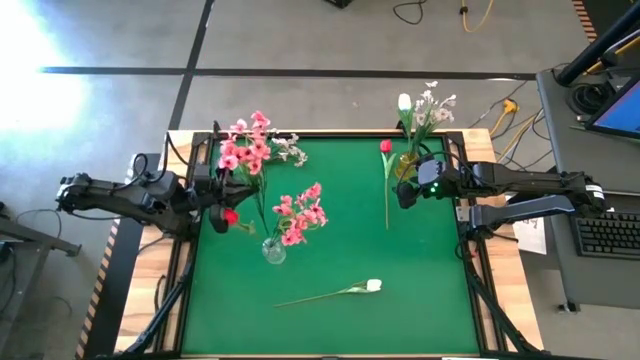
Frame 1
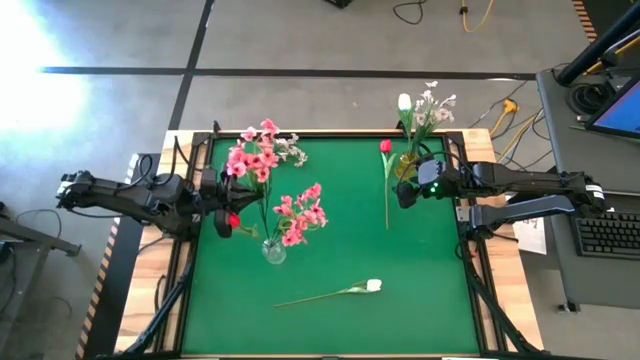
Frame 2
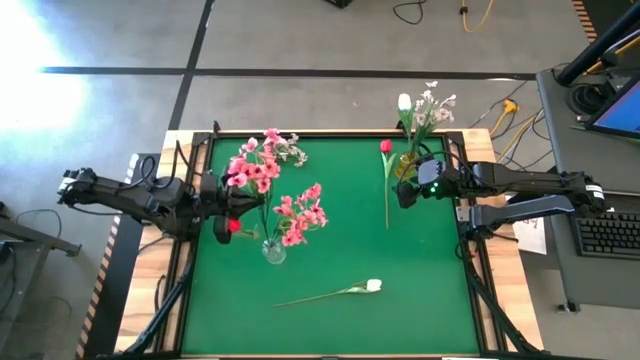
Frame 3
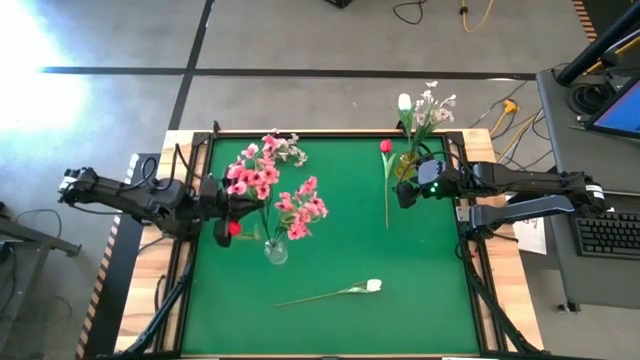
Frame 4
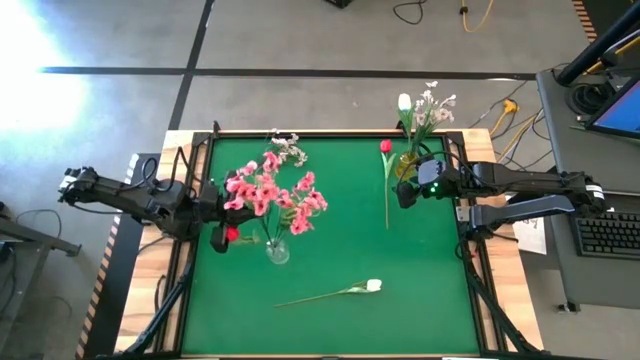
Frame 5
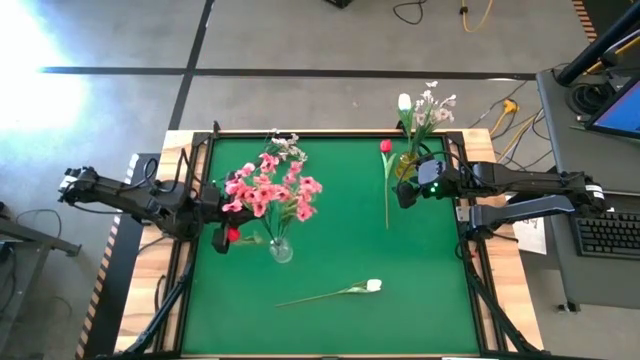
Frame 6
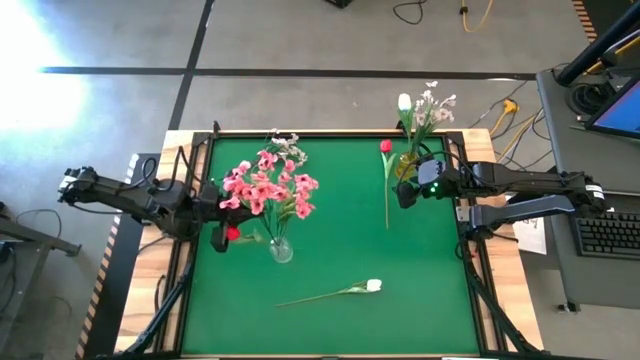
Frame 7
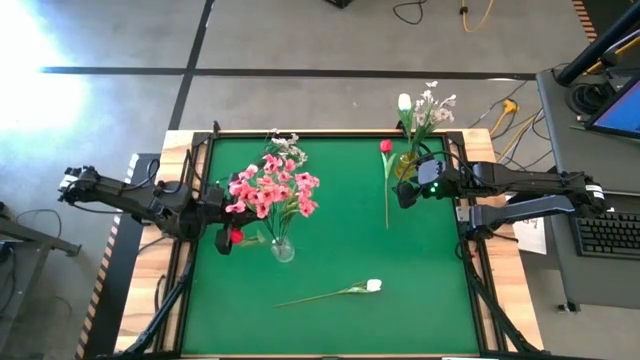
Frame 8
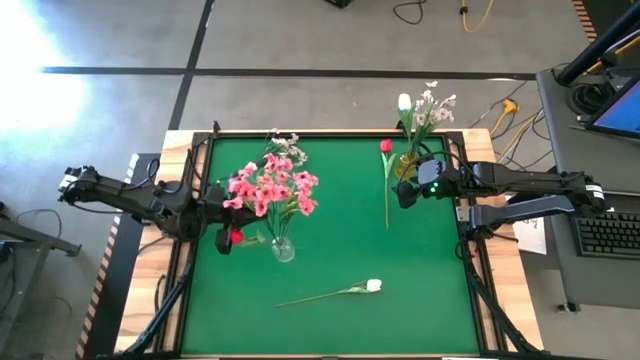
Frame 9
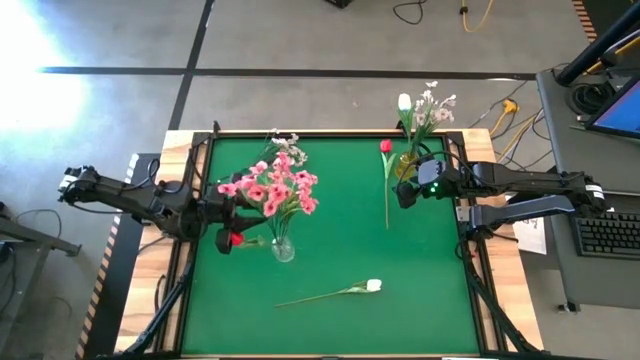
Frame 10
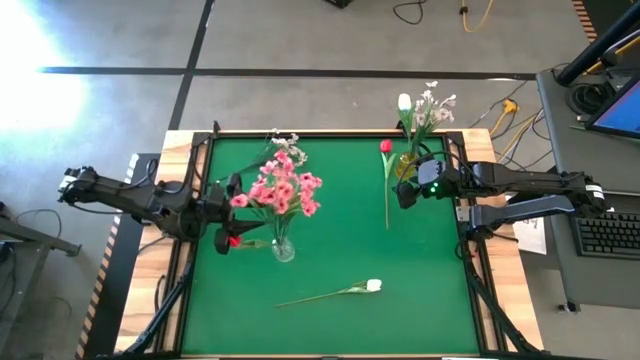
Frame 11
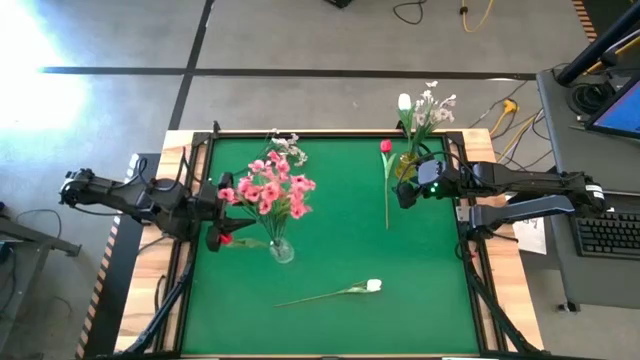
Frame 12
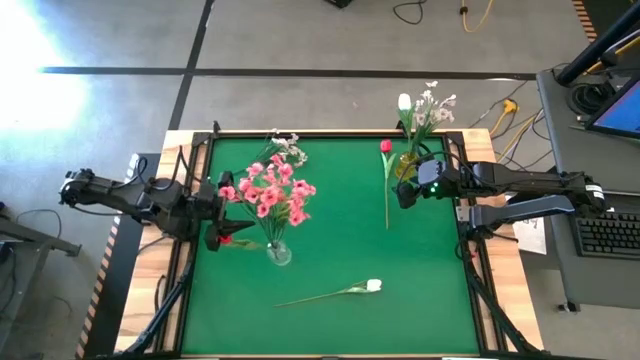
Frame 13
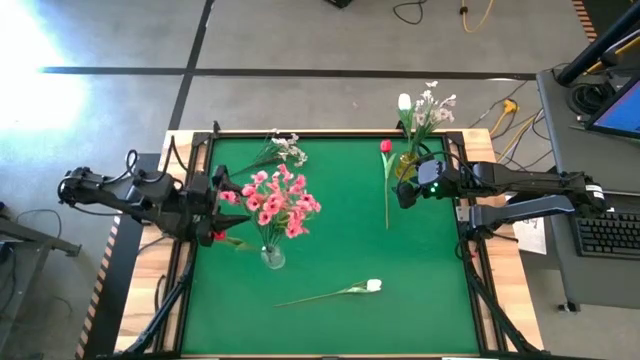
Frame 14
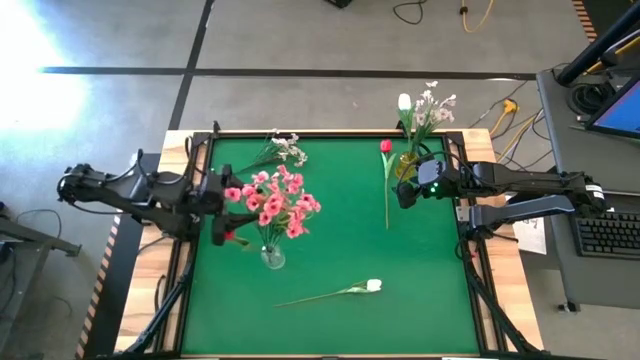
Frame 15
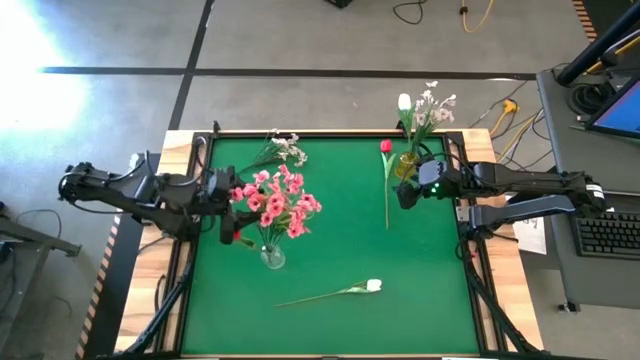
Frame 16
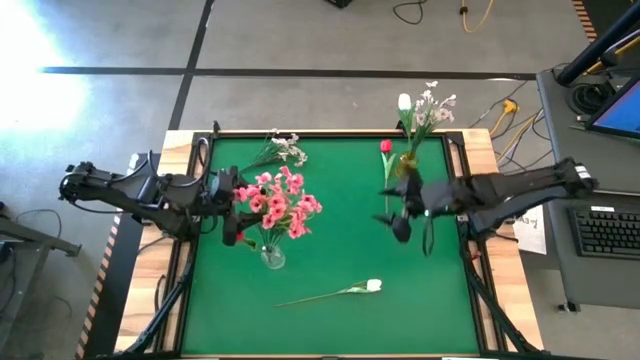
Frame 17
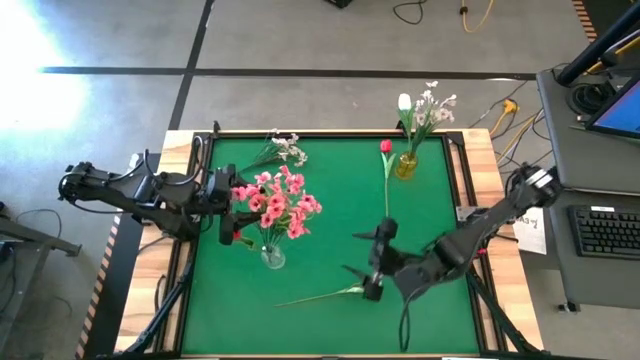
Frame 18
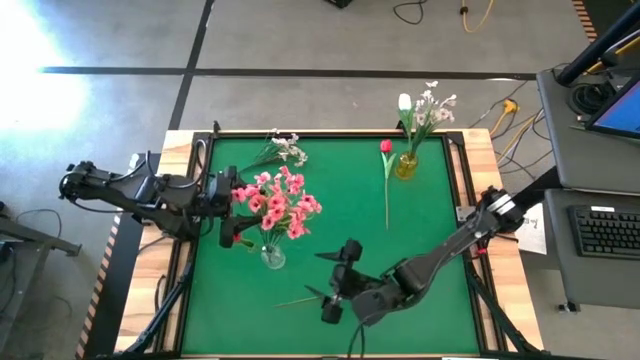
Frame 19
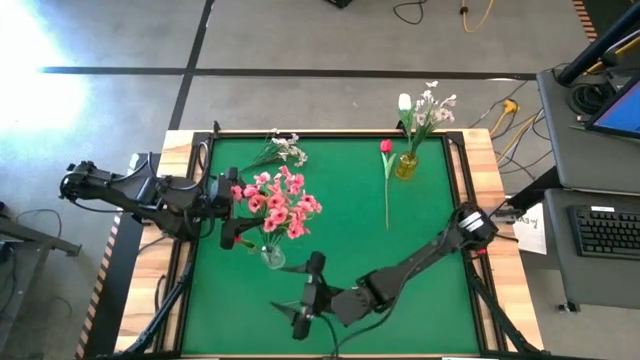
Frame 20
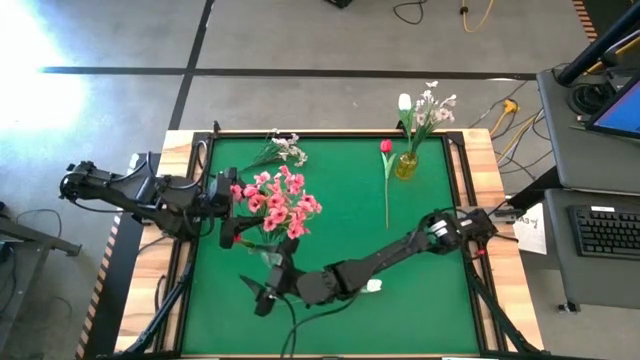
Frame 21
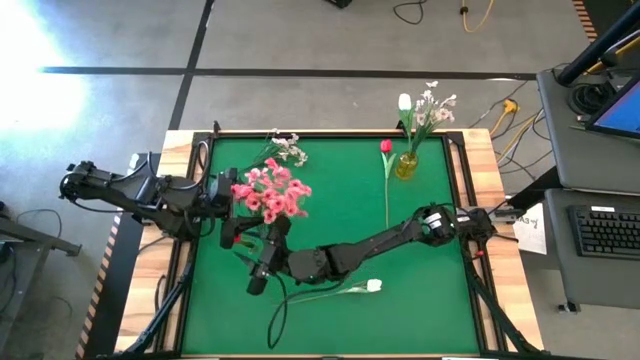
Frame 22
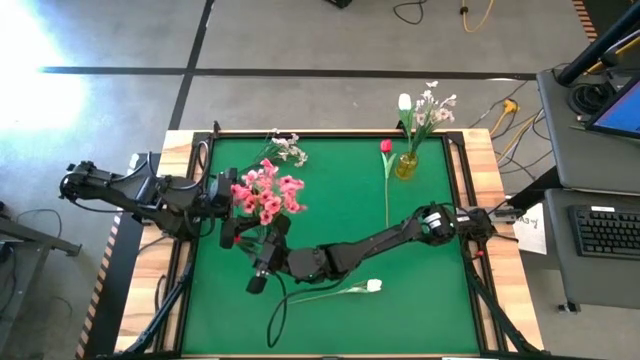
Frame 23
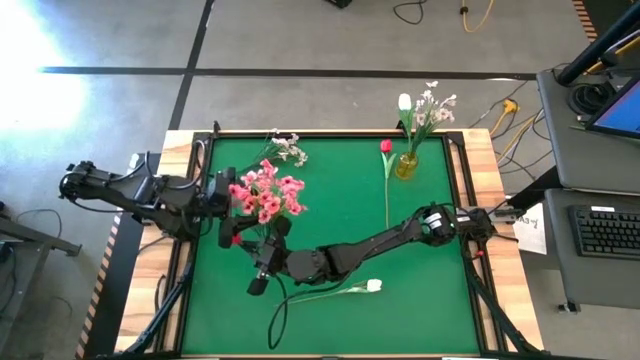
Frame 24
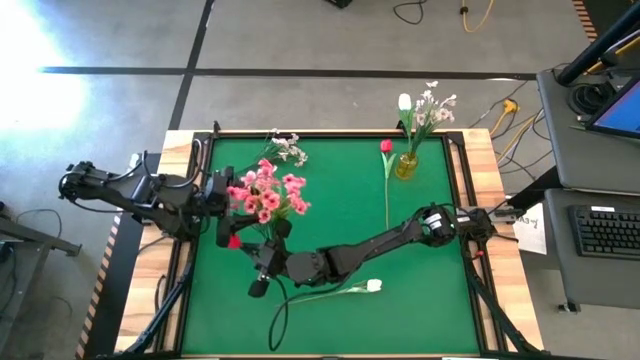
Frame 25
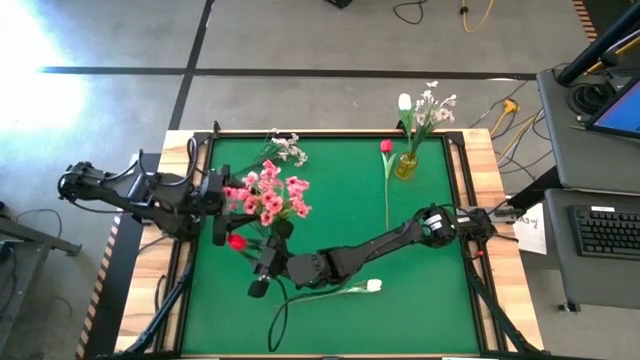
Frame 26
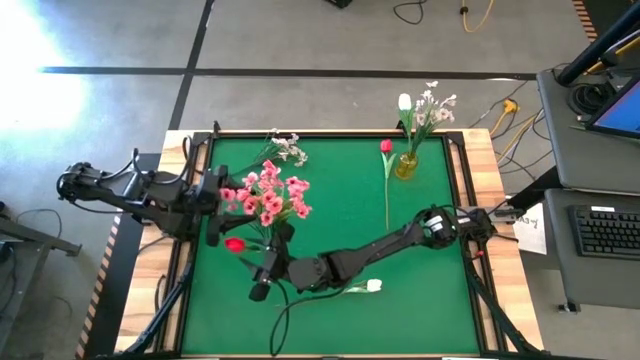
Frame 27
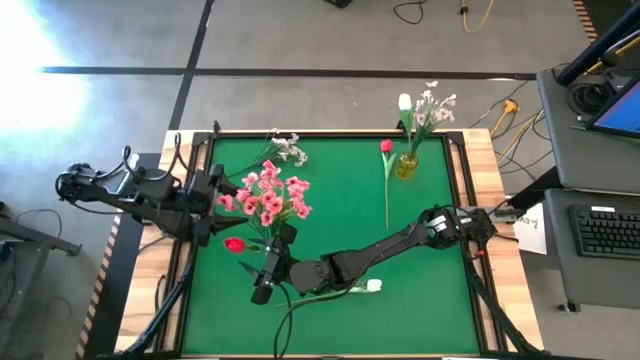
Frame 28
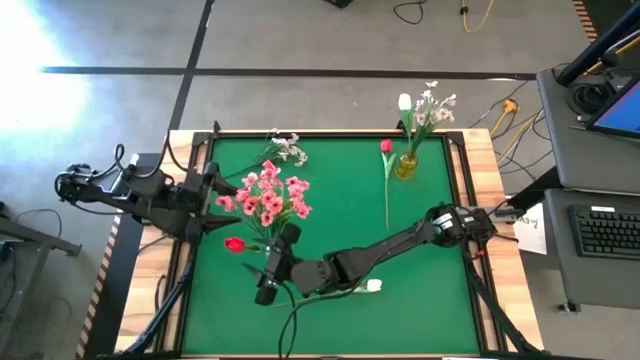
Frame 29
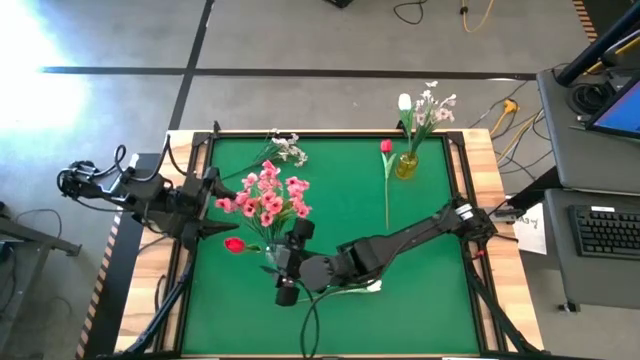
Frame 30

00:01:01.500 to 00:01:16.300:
Task: Sort flowers into vase by color
Put the pink flowers into the transparent vase

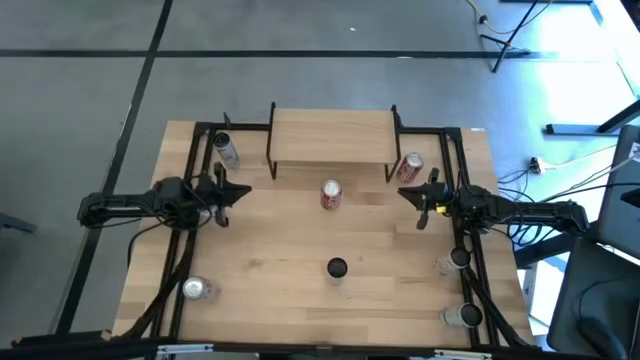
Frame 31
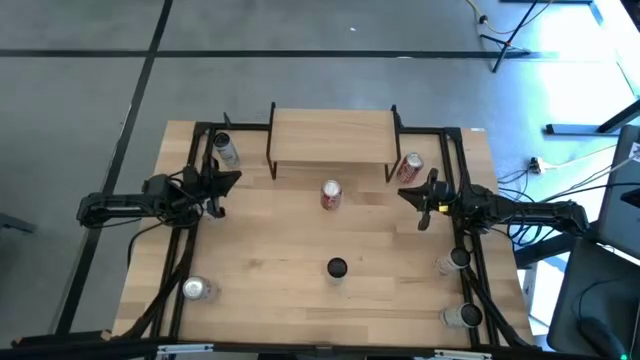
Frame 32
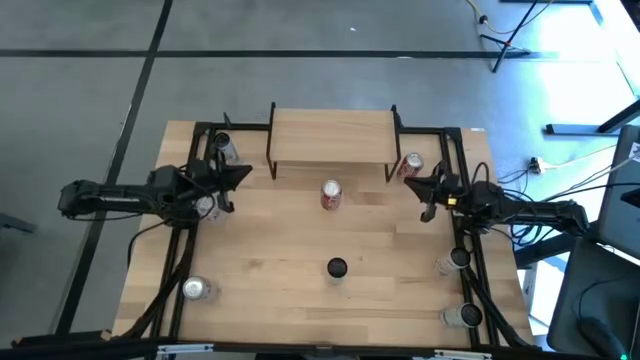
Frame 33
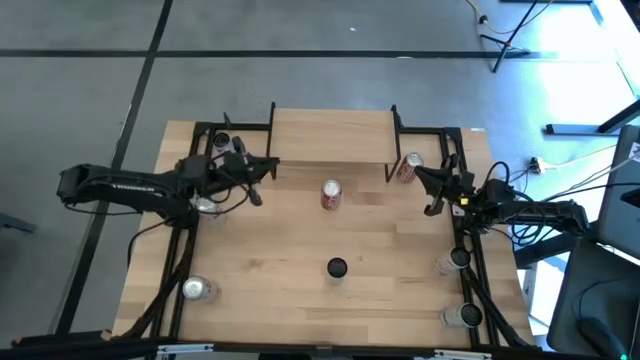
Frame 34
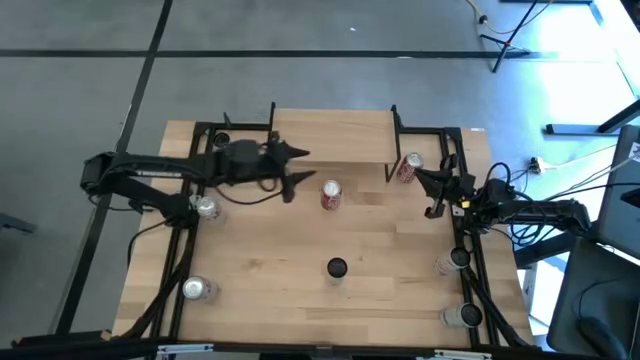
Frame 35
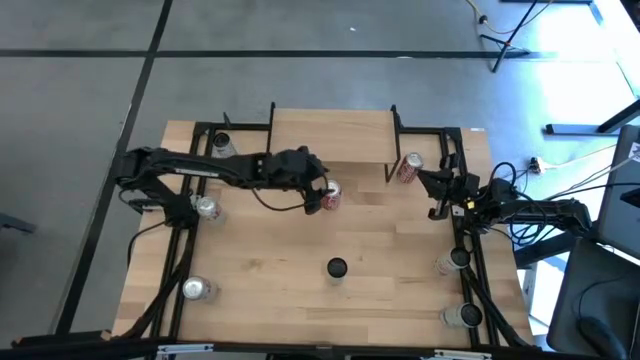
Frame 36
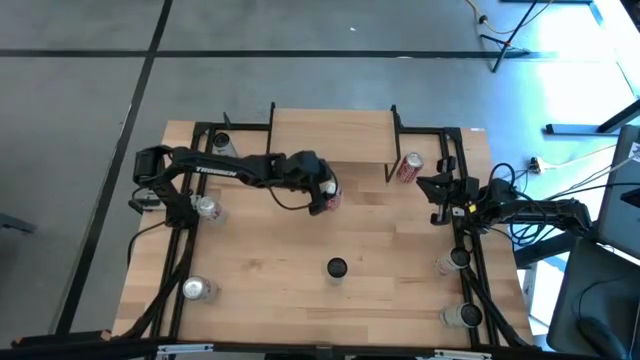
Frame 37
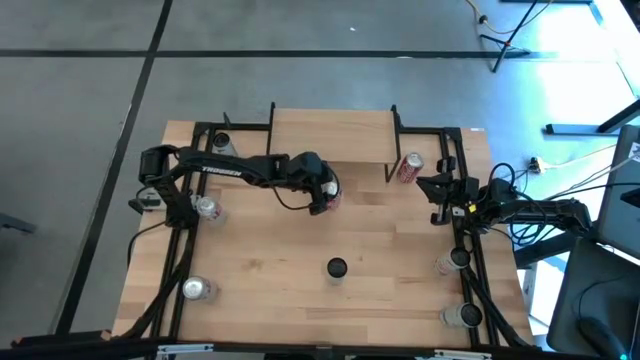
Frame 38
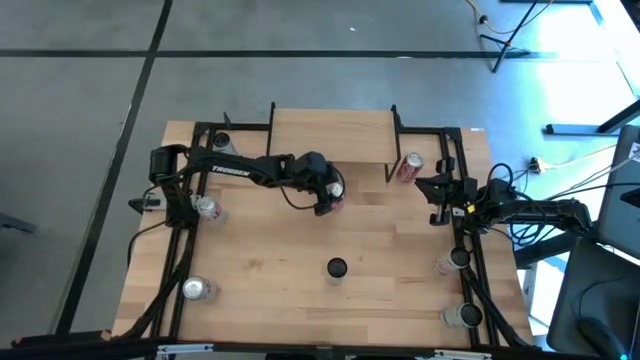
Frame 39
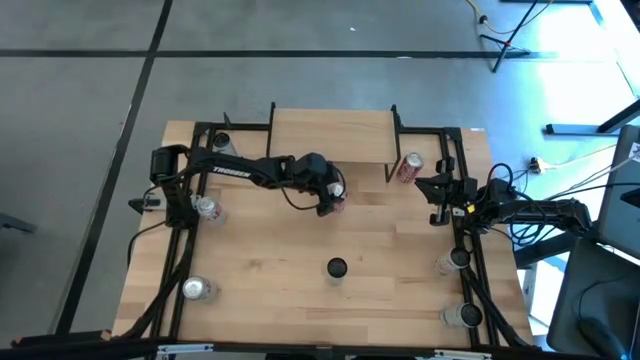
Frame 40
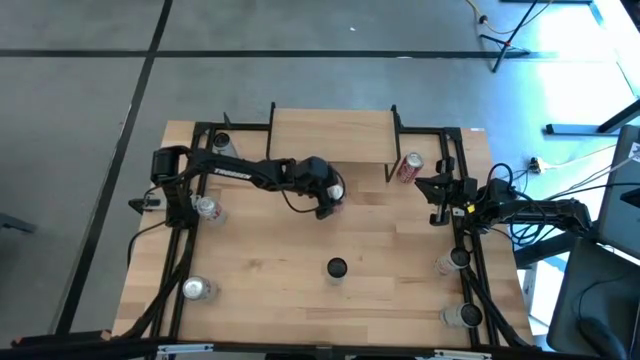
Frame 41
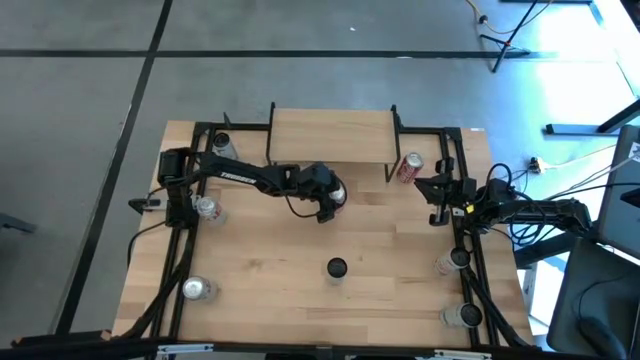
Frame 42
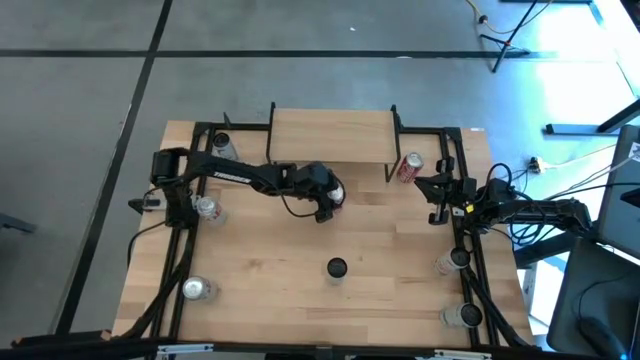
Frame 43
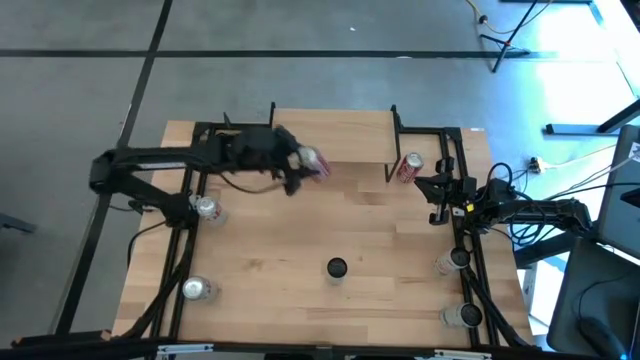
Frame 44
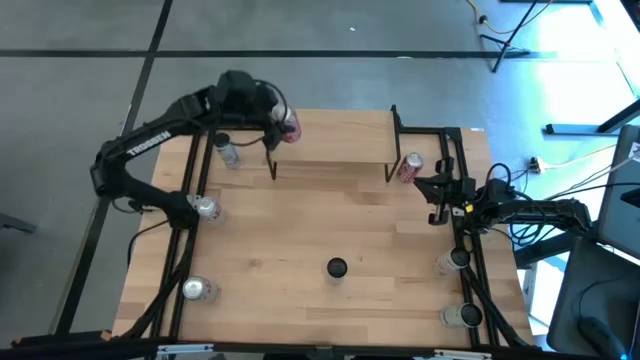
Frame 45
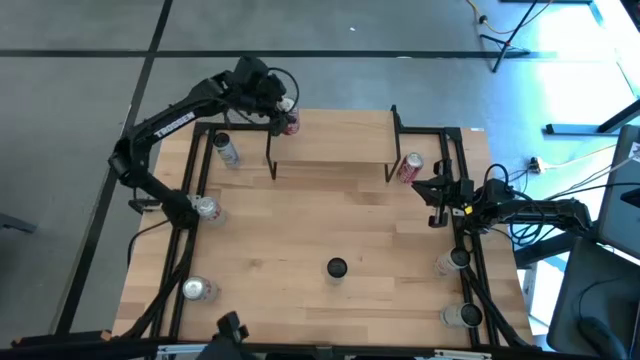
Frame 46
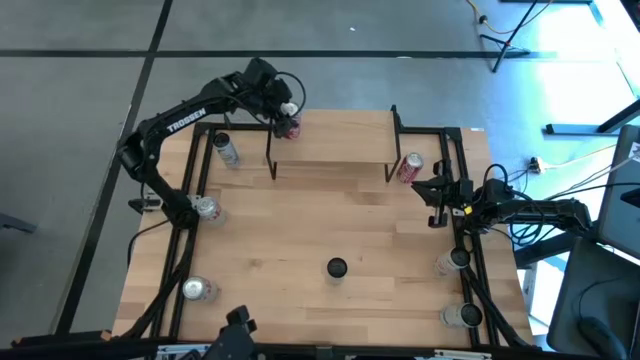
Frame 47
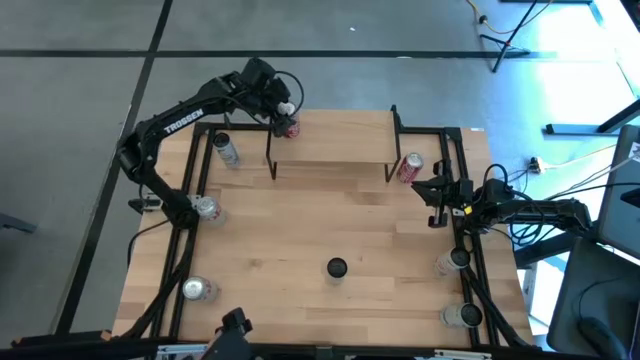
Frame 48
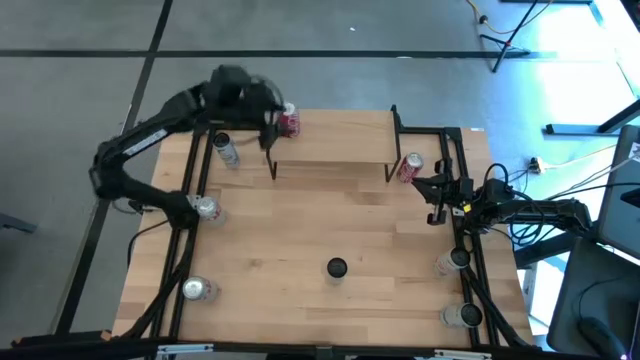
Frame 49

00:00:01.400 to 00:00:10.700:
Task: Place canned beverage on shelf
Put the left red-white soda can on the shelf
